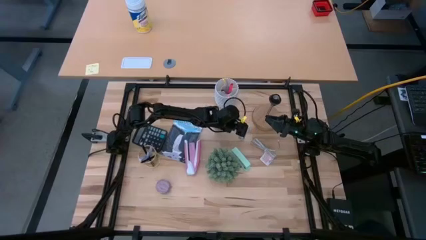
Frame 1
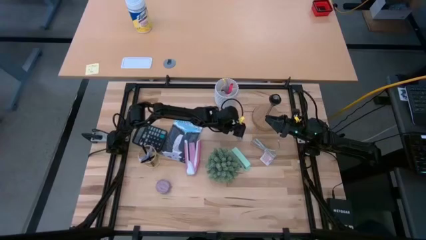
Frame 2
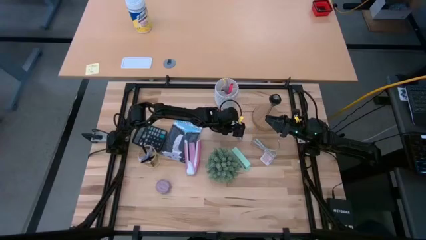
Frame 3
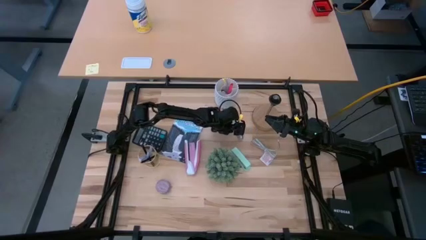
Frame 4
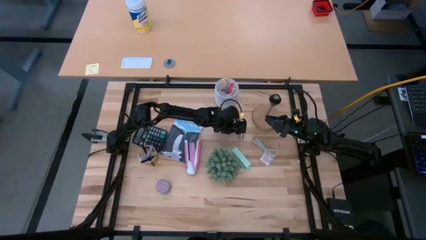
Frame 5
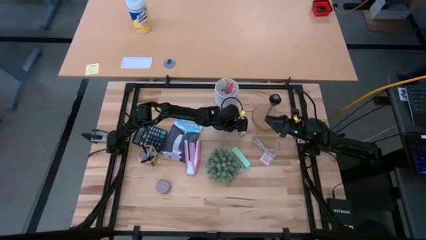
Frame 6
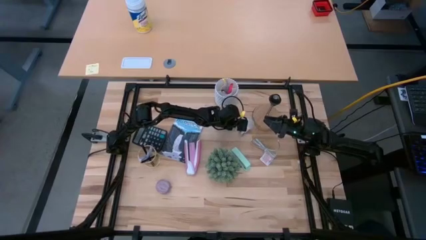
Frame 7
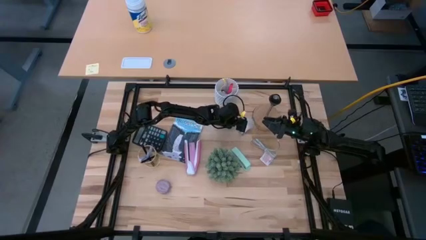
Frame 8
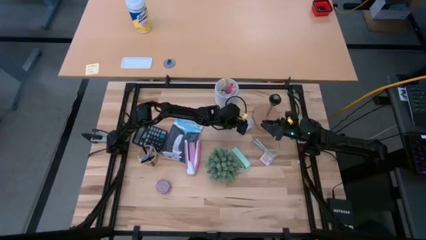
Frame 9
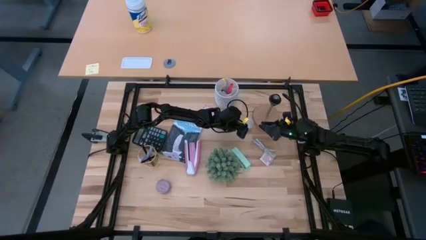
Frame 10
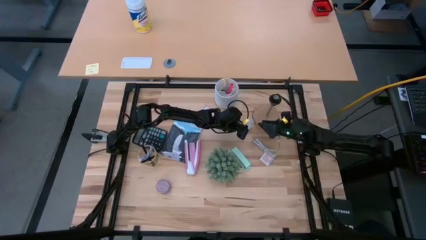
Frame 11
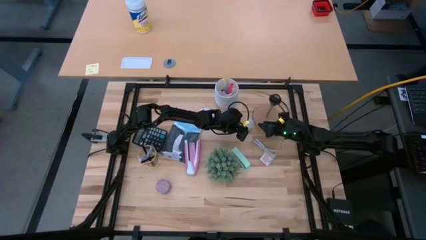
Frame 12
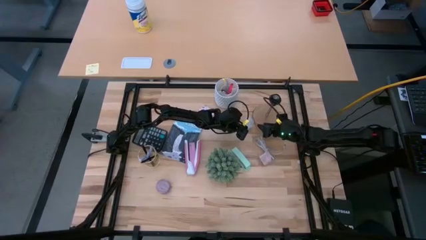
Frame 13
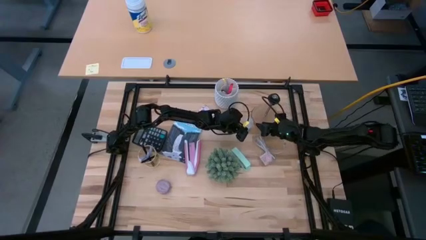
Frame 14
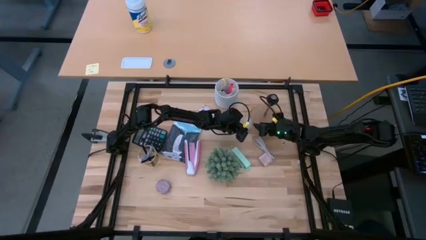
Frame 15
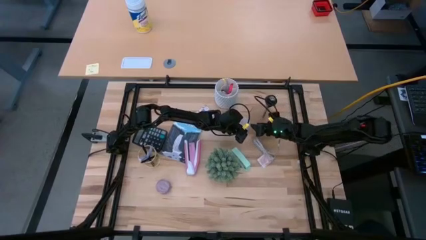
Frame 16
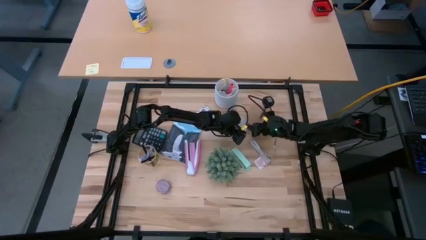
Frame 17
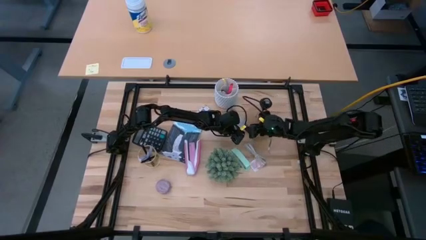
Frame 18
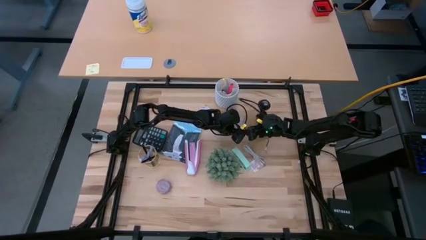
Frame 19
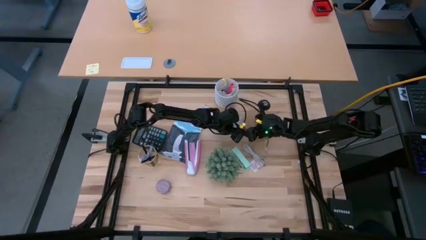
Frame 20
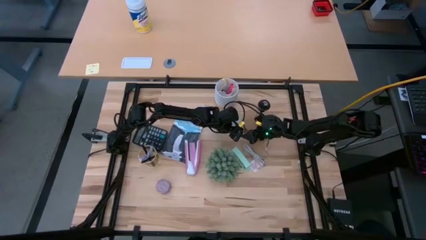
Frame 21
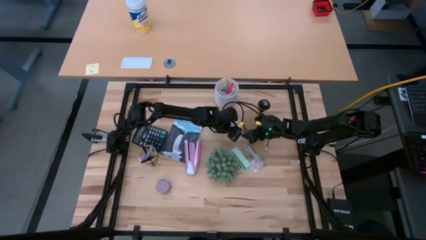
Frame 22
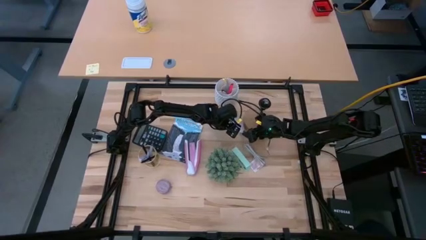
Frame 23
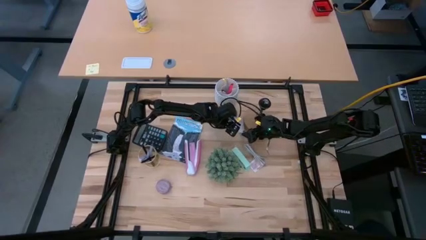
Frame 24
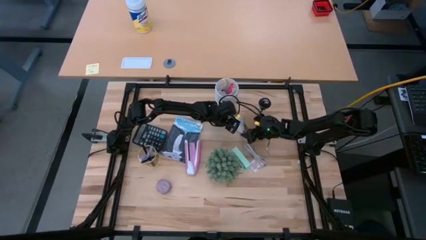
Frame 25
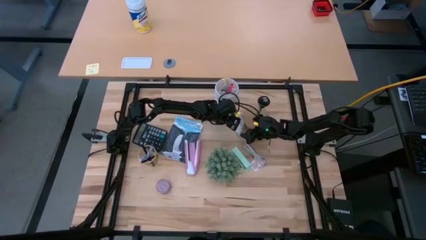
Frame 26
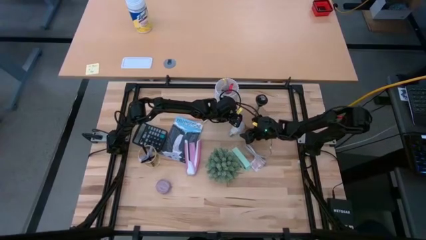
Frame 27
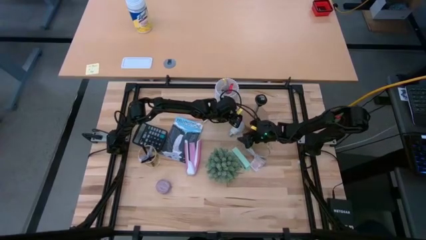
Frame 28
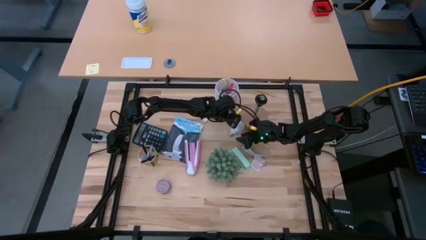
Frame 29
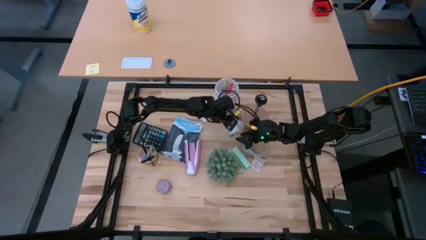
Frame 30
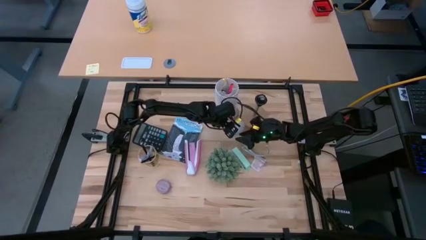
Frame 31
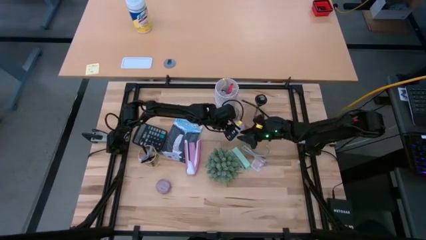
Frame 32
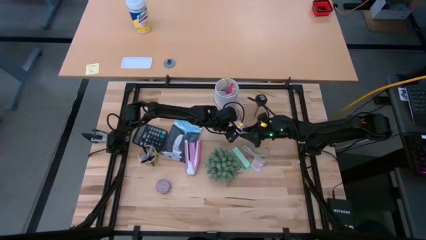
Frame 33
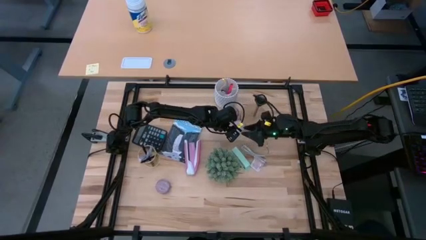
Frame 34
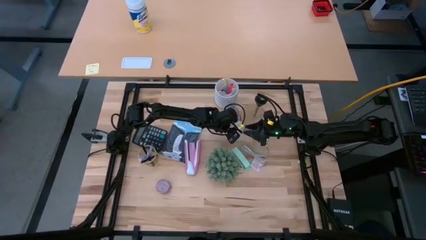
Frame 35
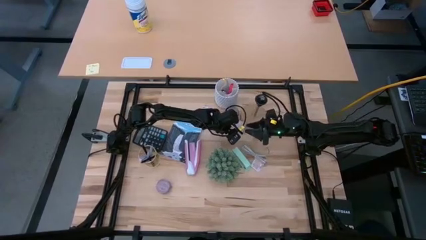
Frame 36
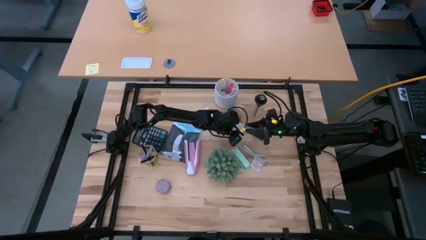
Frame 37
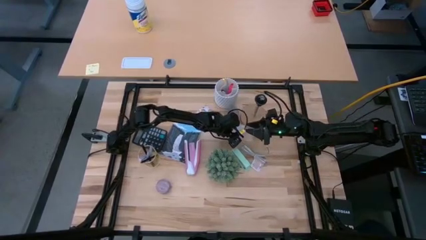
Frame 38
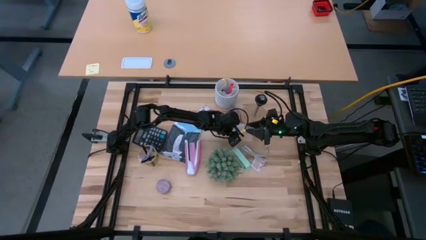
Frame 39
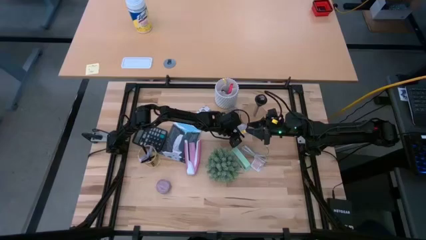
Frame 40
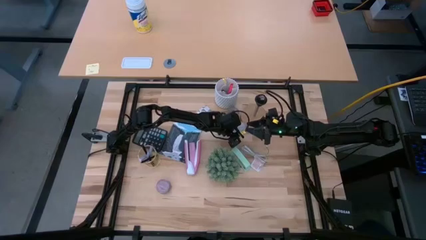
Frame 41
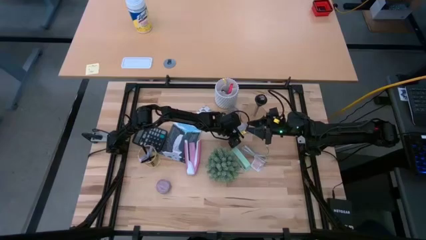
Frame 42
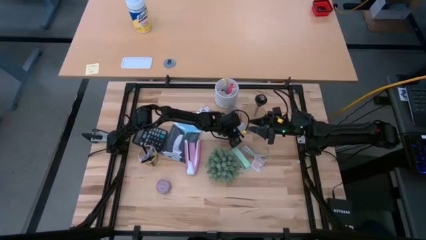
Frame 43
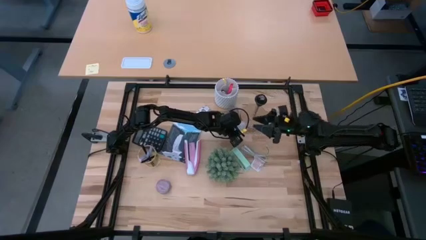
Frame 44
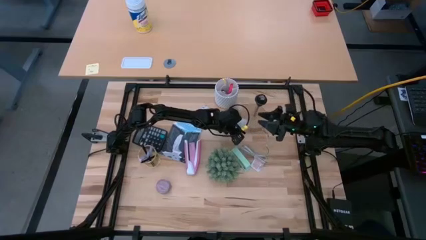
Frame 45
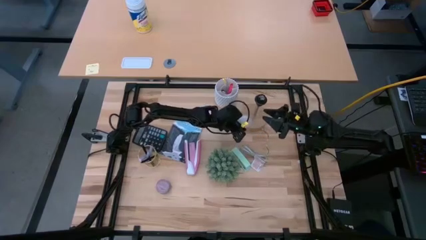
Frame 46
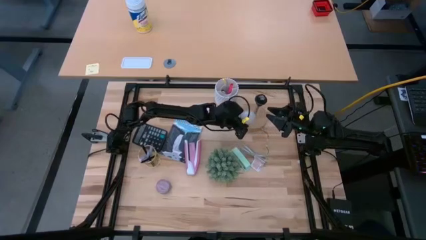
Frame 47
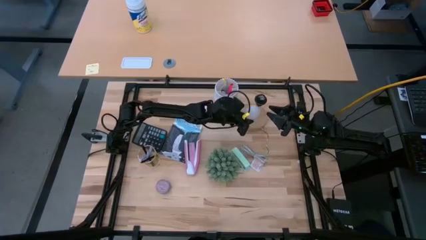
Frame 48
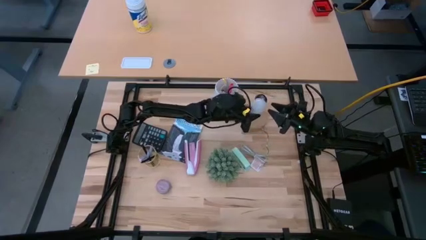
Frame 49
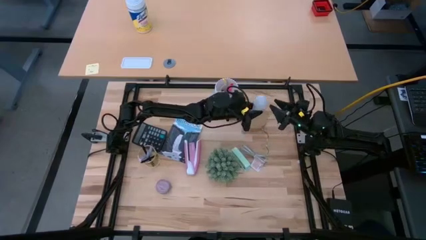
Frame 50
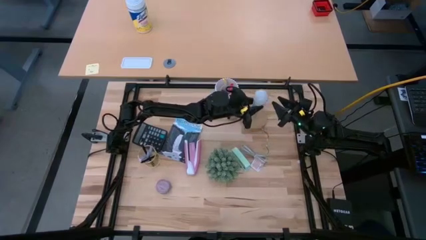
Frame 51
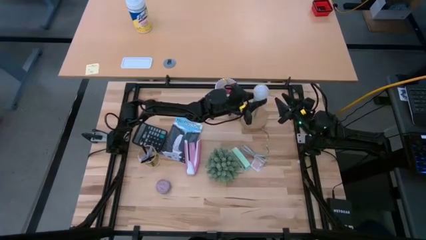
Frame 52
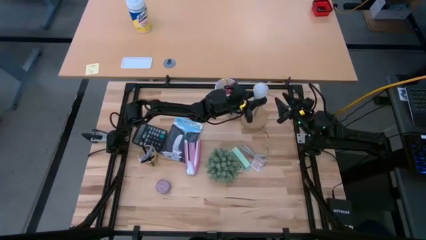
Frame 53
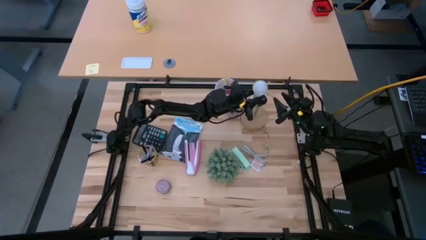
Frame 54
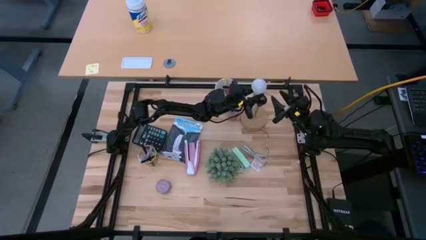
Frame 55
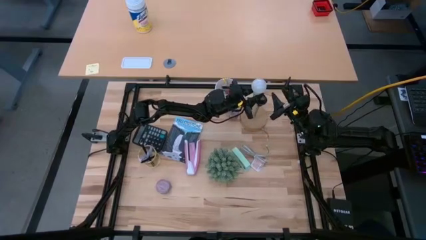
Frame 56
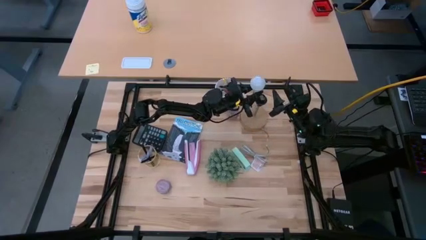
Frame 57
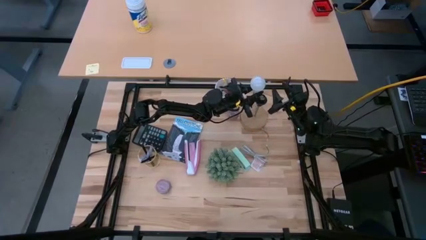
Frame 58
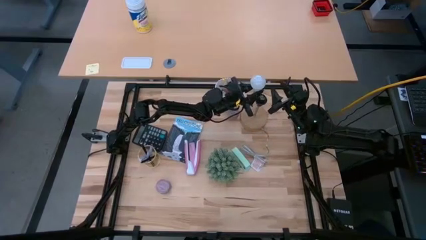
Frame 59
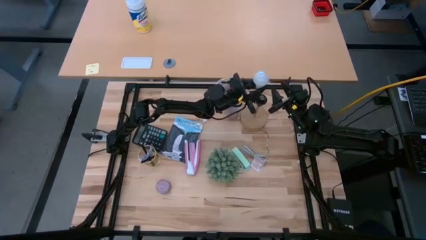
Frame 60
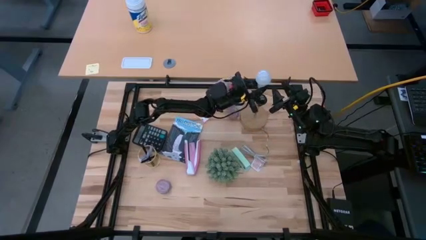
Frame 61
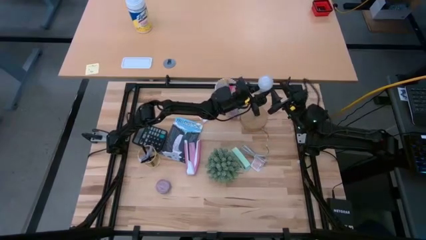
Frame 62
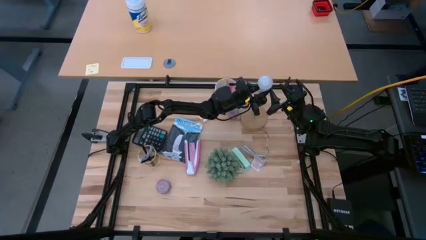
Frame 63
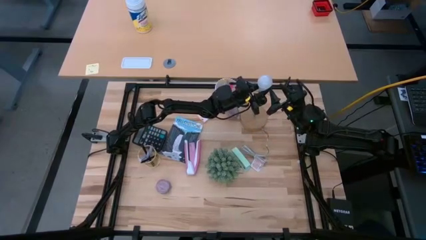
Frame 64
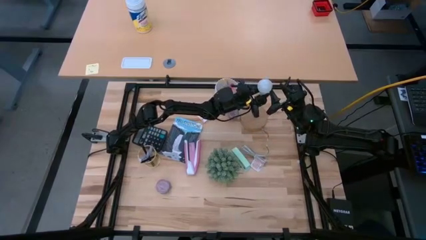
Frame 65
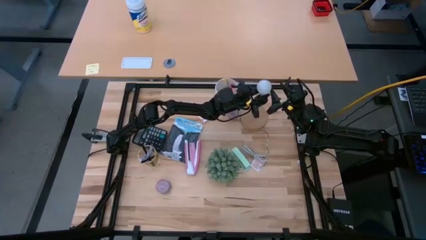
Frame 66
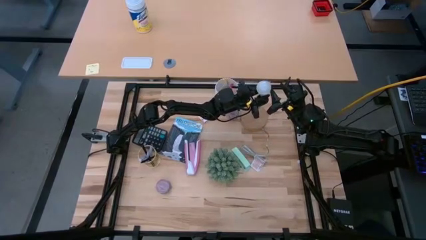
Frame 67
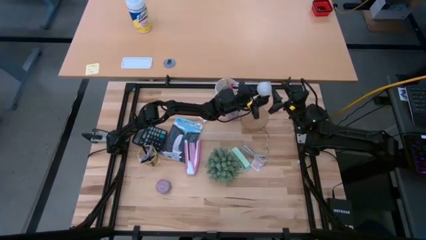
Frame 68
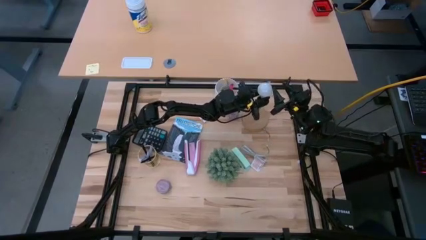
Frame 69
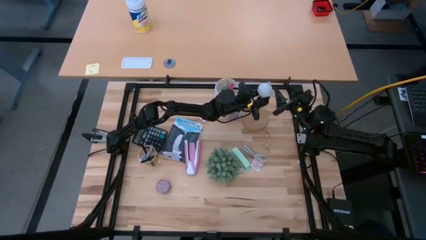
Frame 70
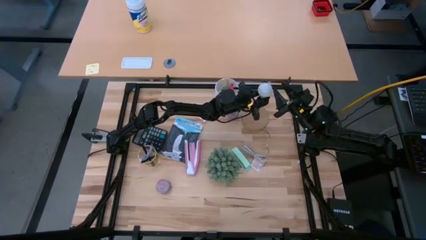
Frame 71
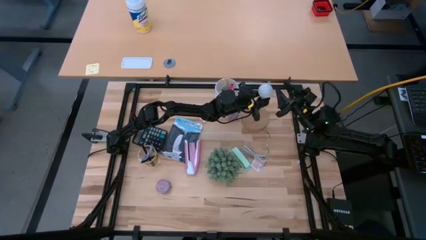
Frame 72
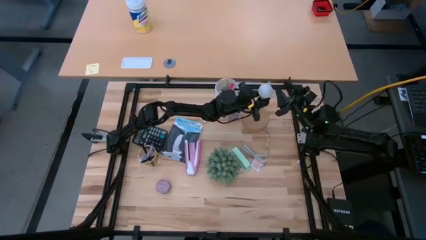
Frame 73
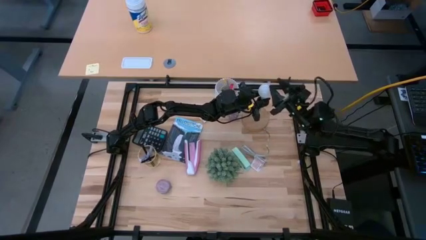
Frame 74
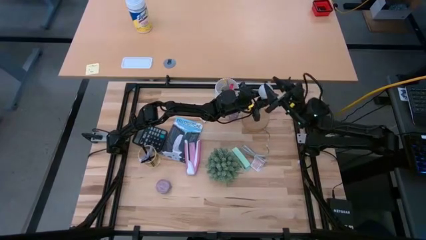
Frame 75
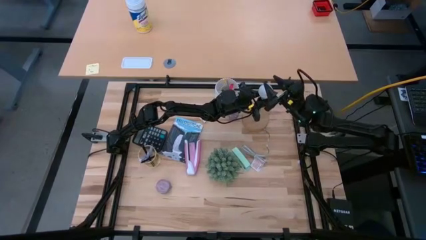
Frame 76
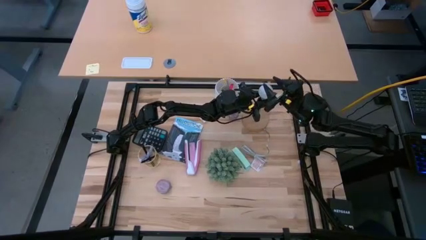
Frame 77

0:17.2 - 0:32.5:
Task: Screw lightbulb
Insert the lightbulb into the lamp
